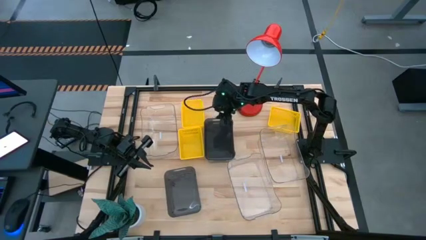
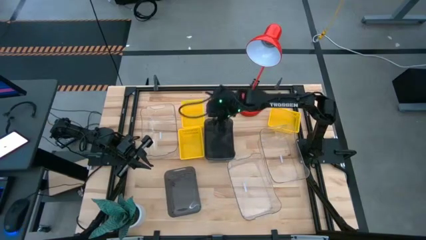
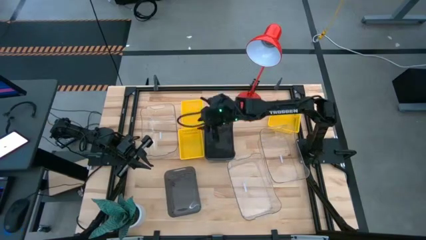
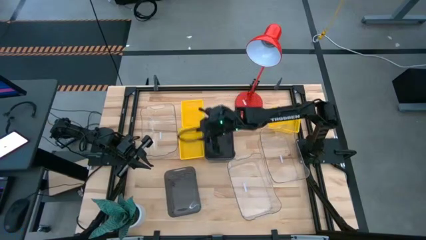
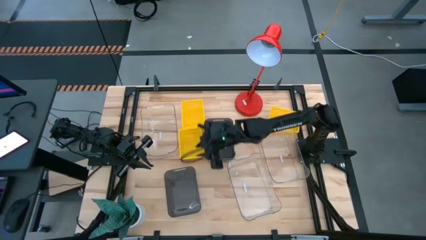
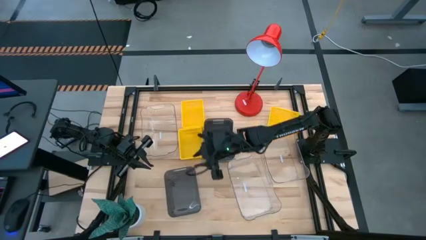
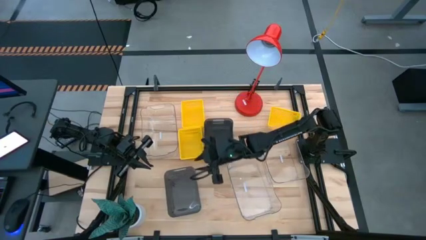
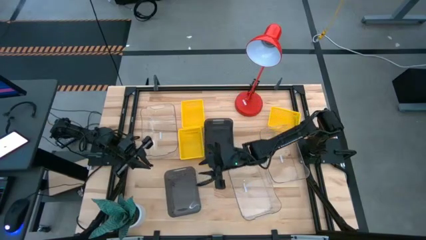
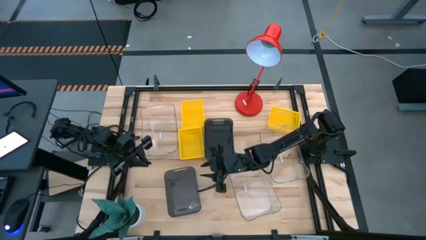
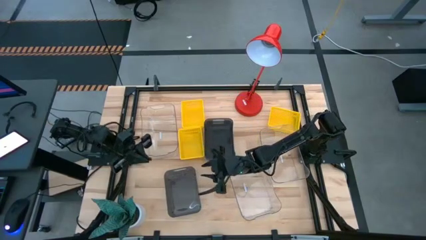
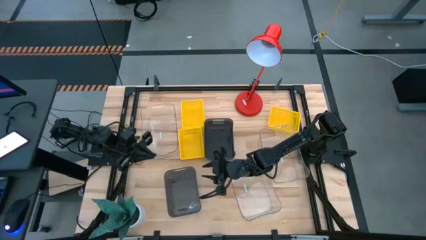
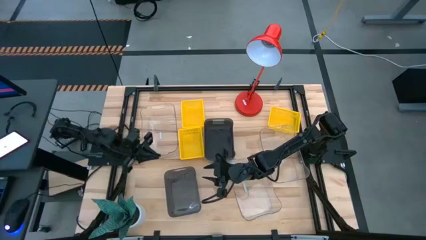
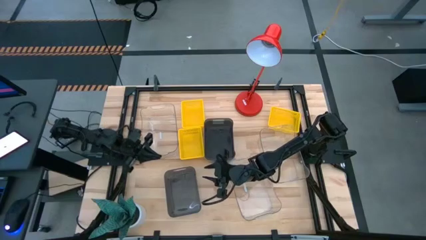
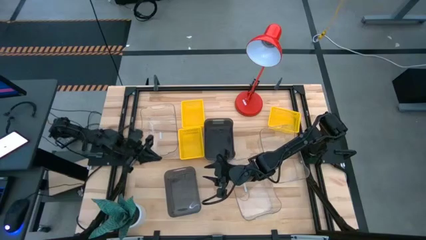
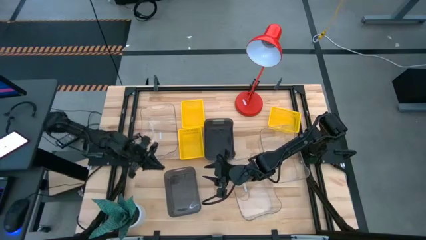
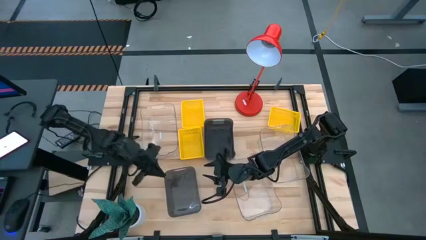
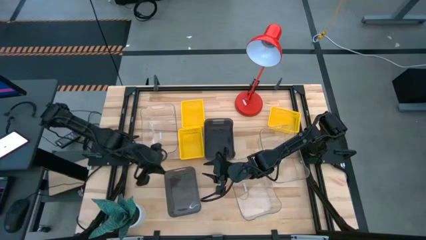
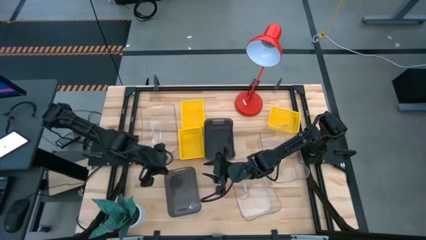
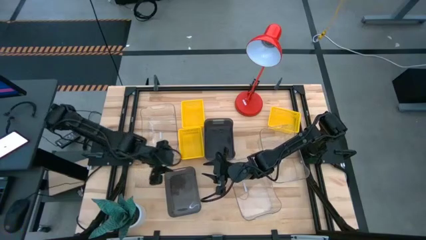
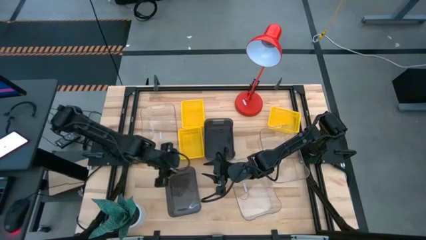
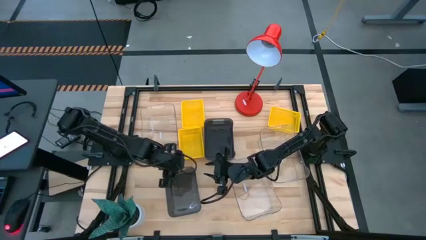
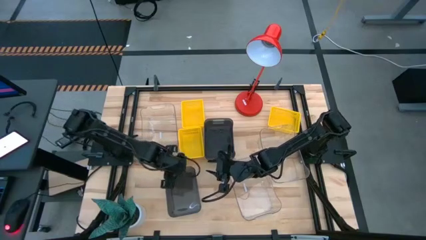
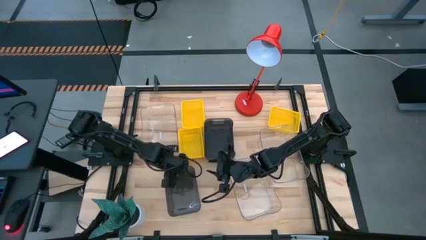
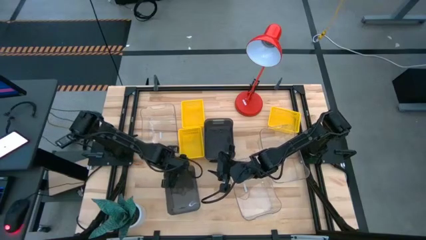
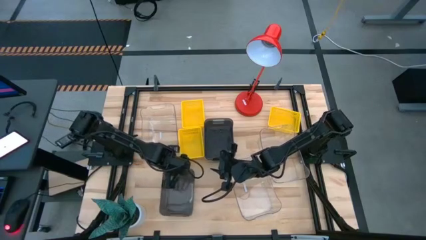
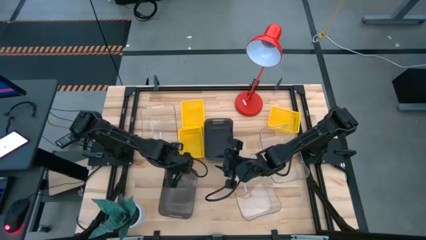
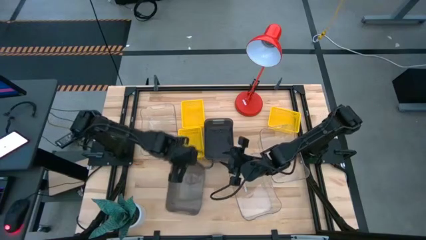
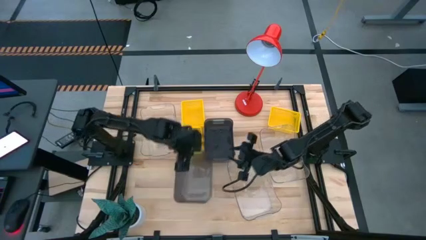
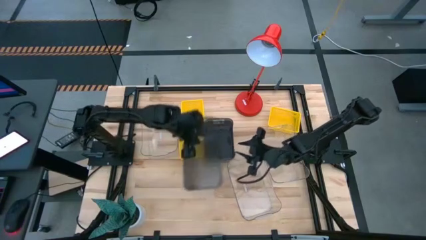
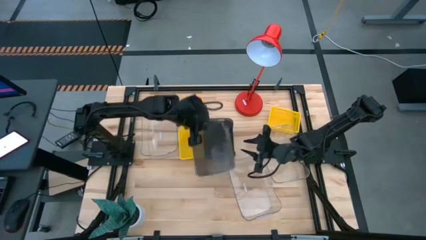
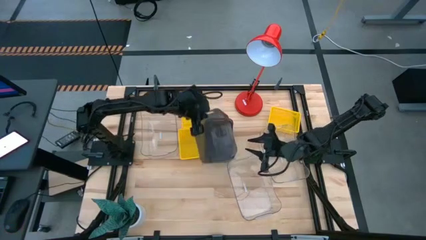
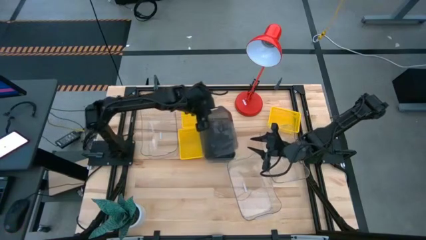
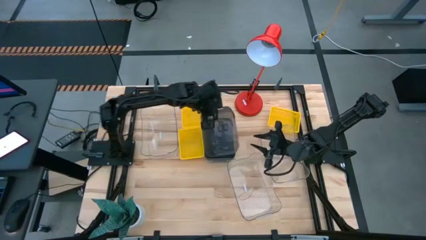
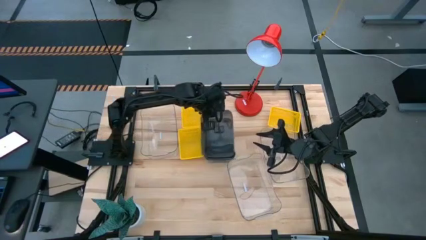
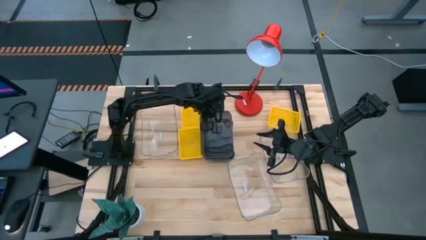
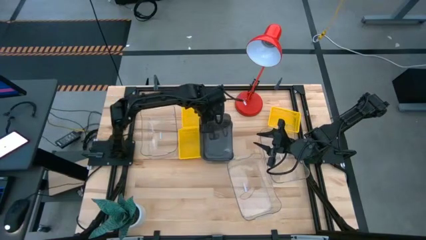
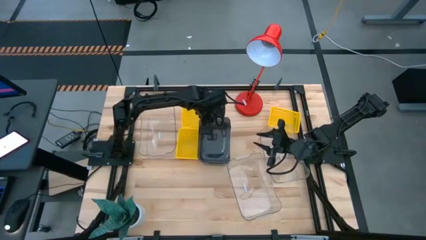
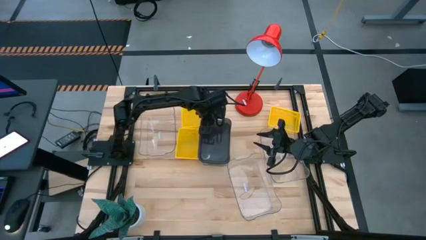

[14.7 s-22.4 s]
Stack the bottom black bin on the black bin

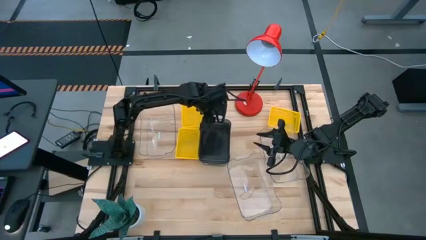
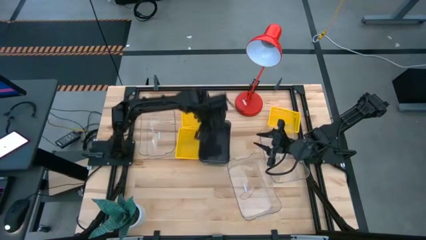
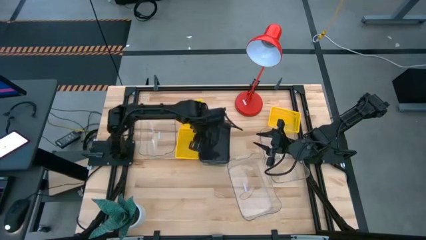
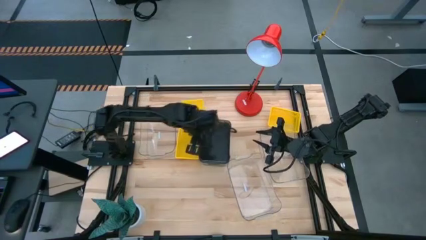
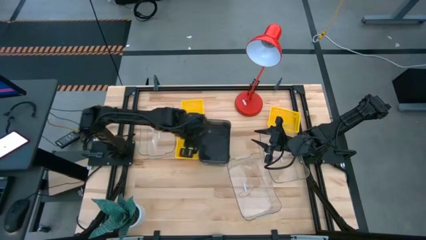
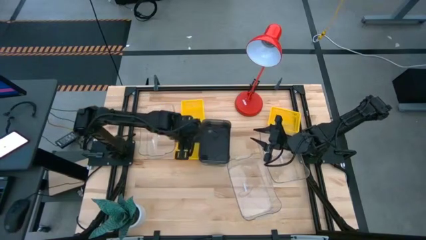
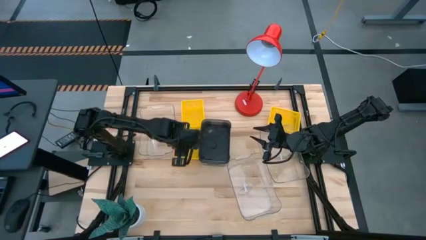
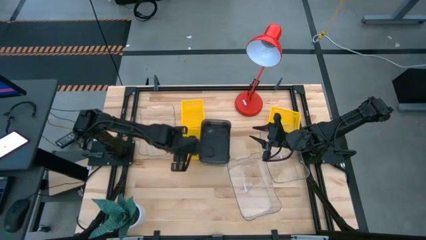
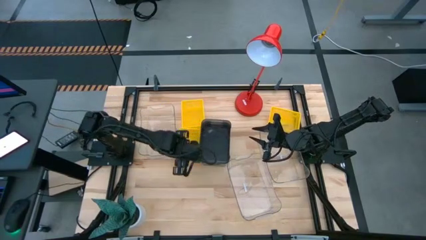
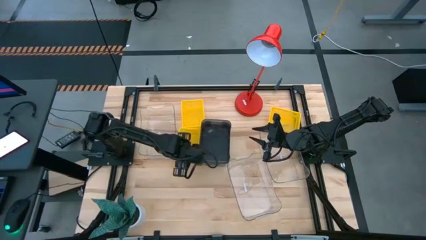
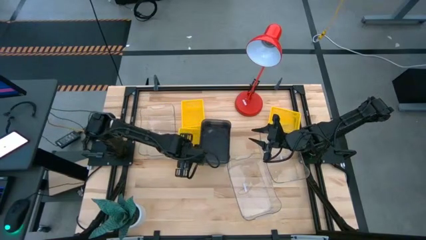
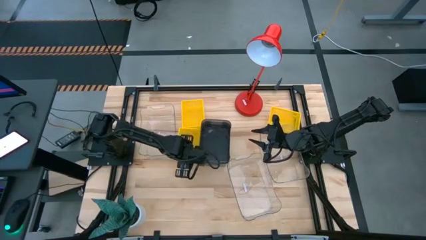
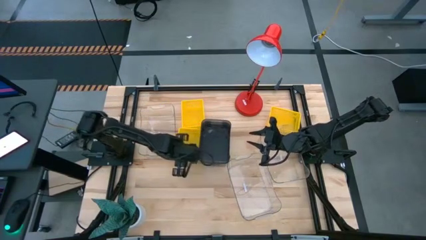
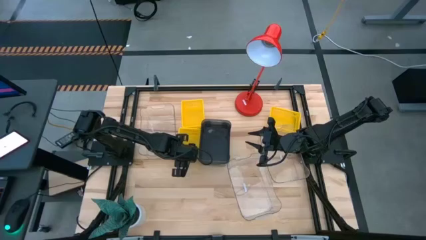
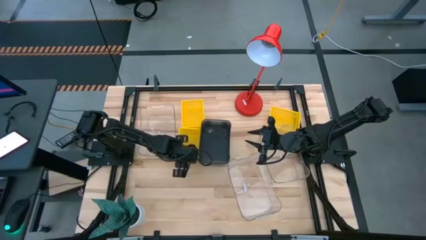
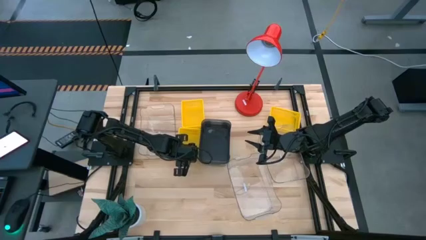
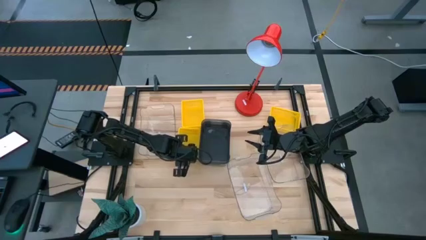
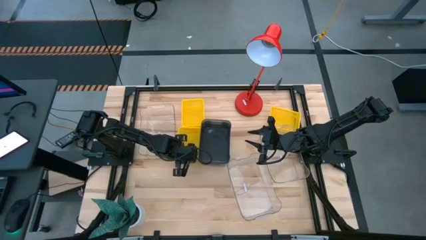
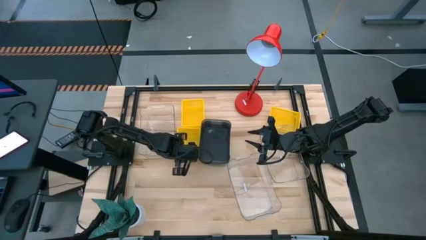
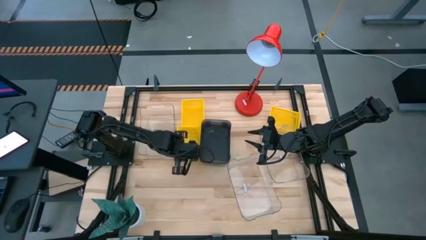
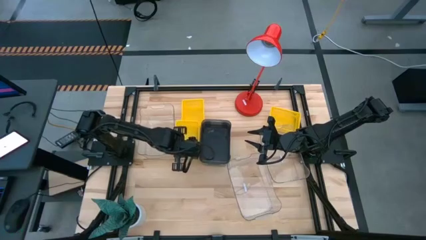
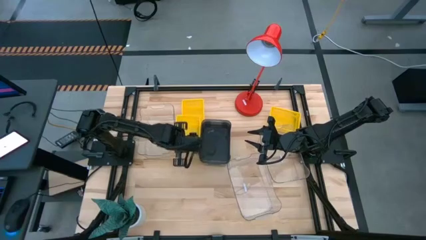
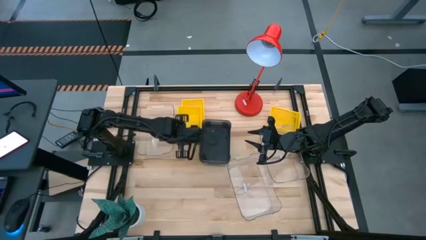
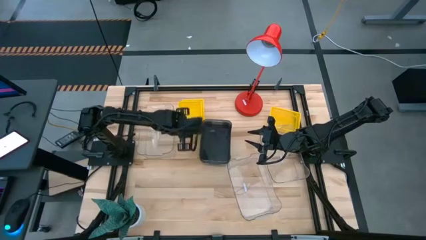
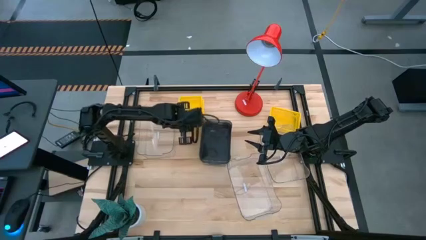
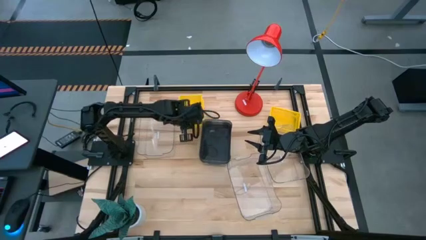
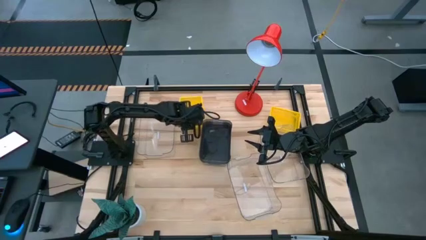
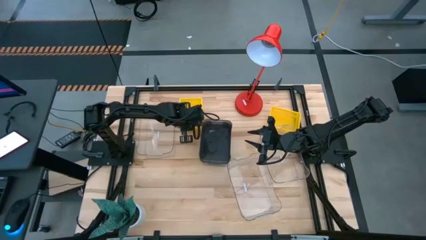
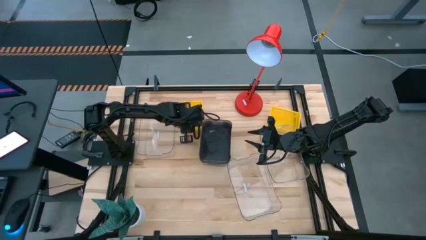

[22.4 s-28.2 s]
Stack the bottom yellow bin on the left yellow bin
